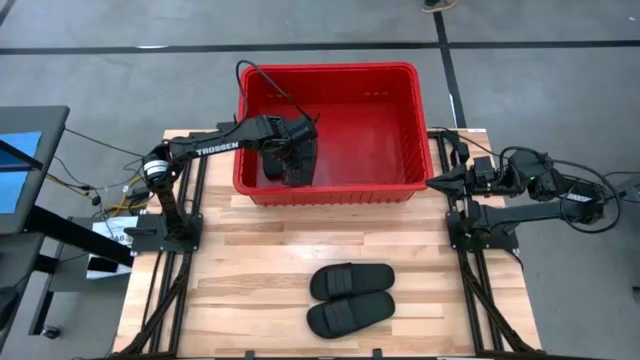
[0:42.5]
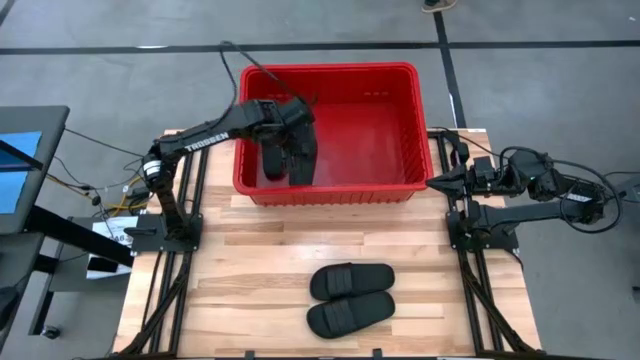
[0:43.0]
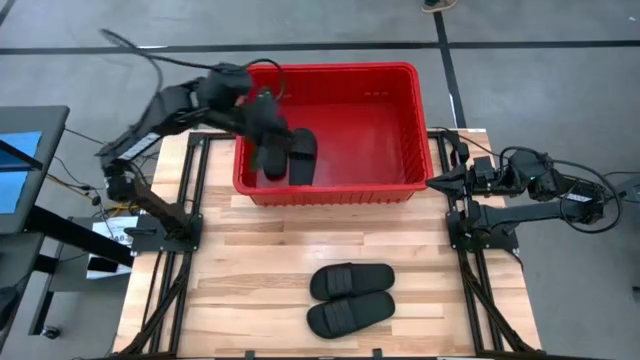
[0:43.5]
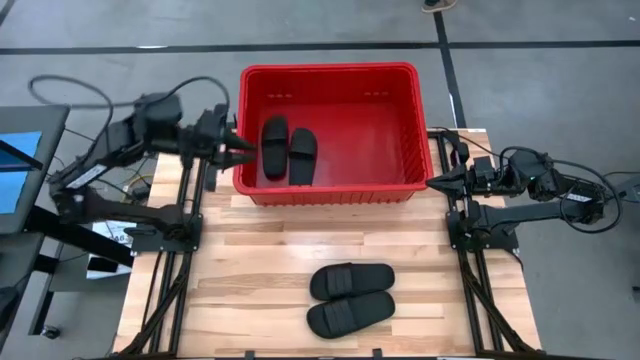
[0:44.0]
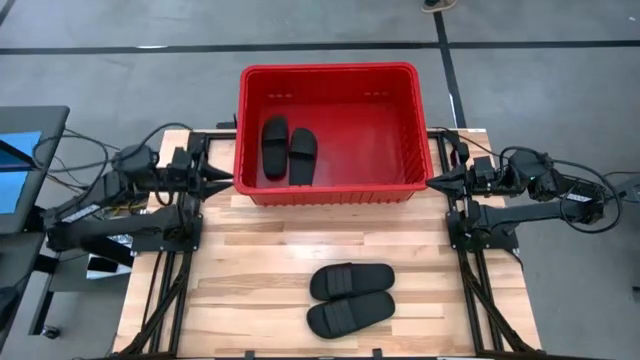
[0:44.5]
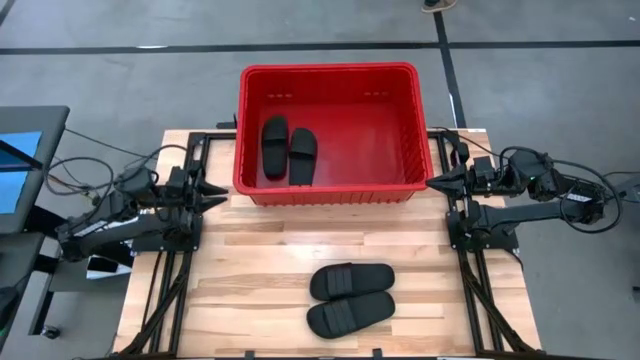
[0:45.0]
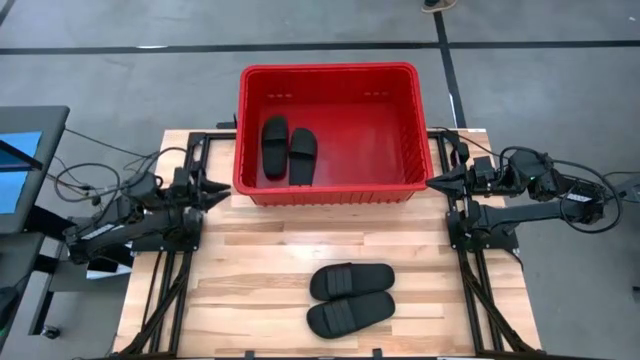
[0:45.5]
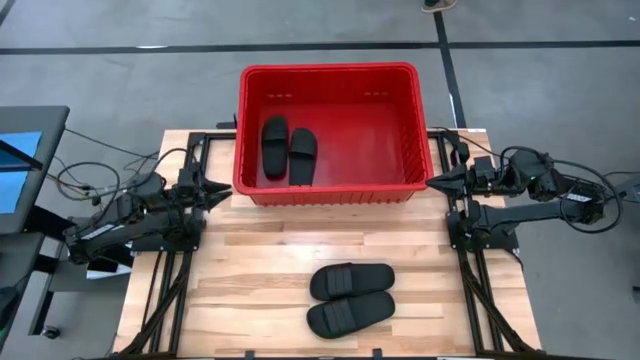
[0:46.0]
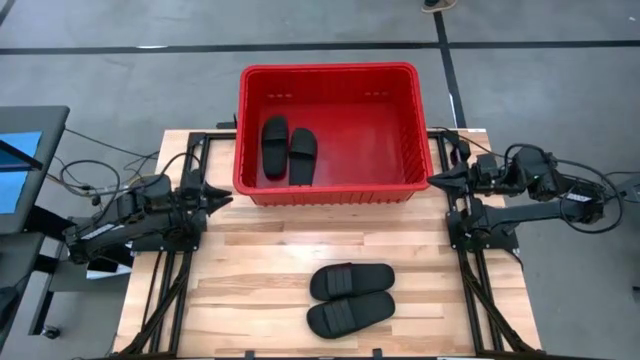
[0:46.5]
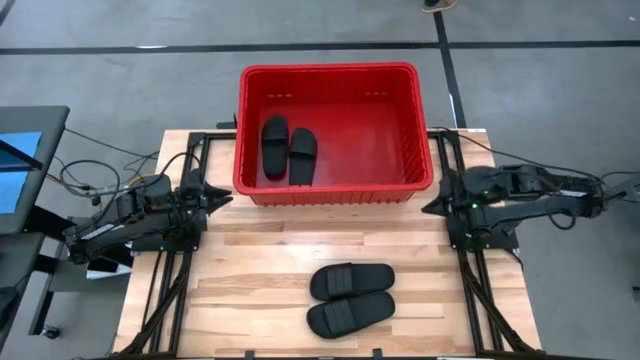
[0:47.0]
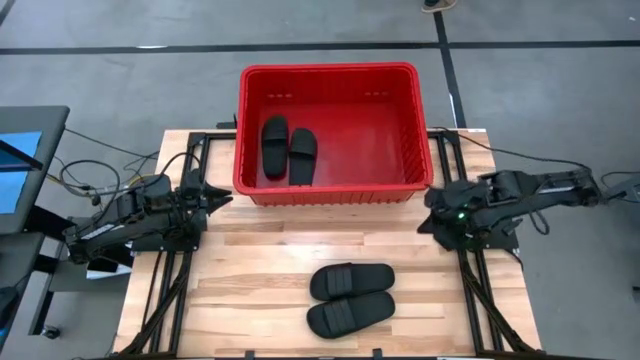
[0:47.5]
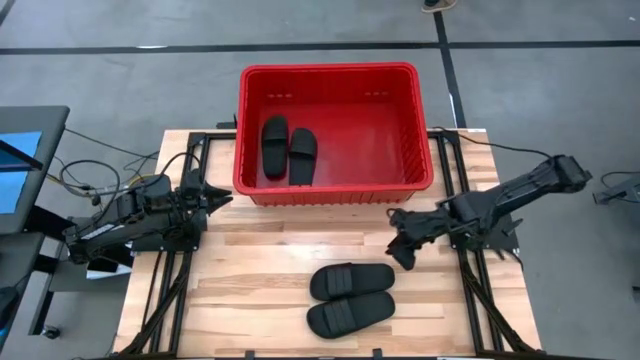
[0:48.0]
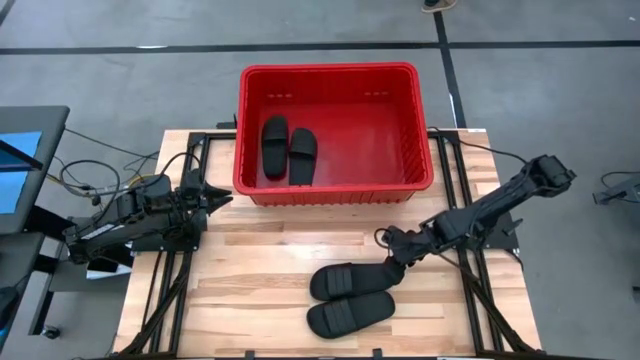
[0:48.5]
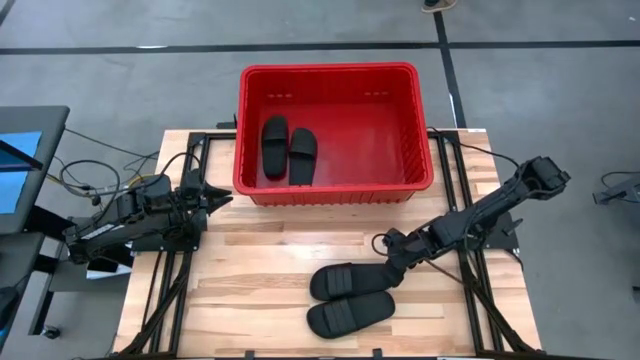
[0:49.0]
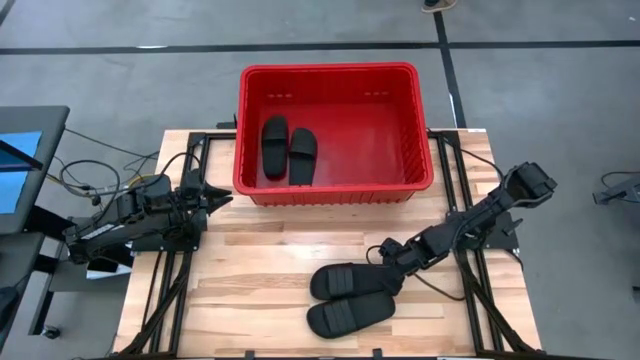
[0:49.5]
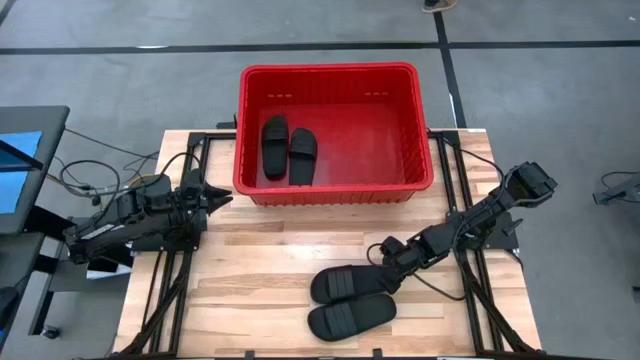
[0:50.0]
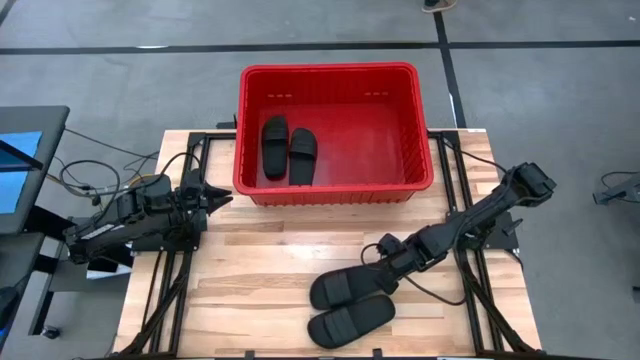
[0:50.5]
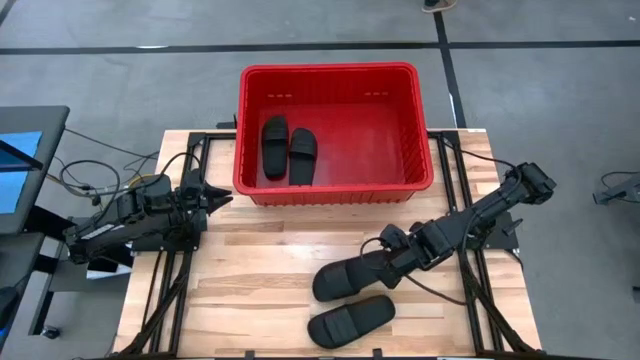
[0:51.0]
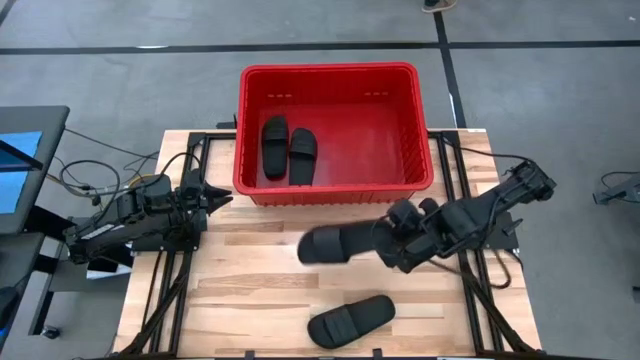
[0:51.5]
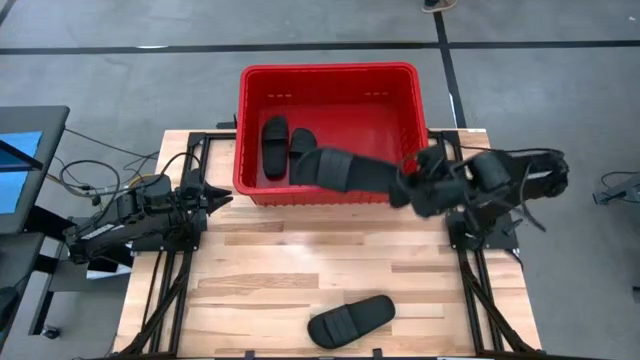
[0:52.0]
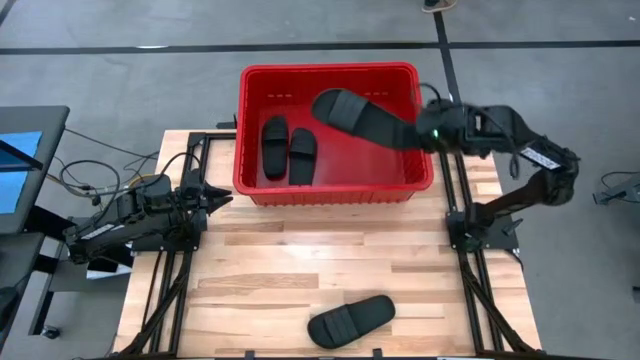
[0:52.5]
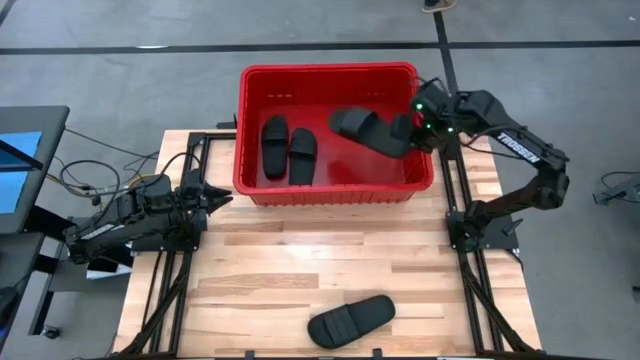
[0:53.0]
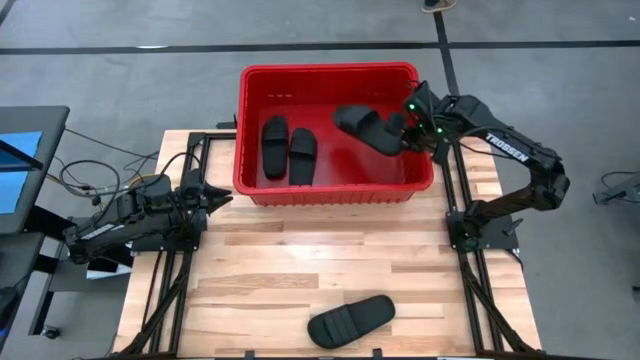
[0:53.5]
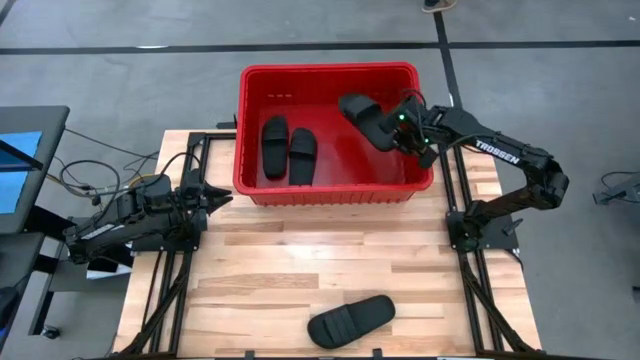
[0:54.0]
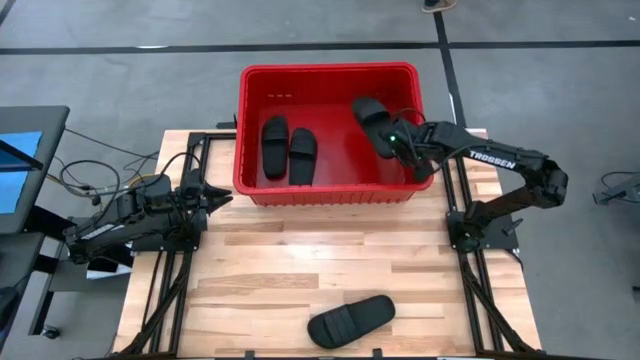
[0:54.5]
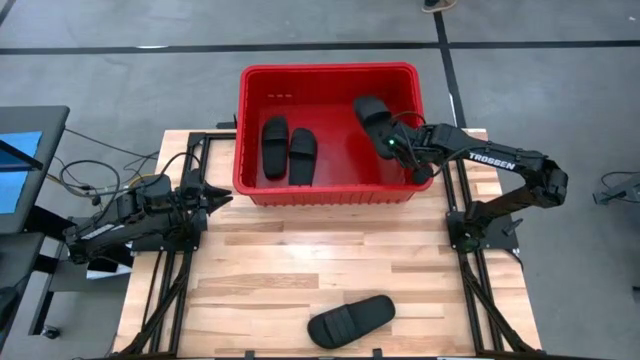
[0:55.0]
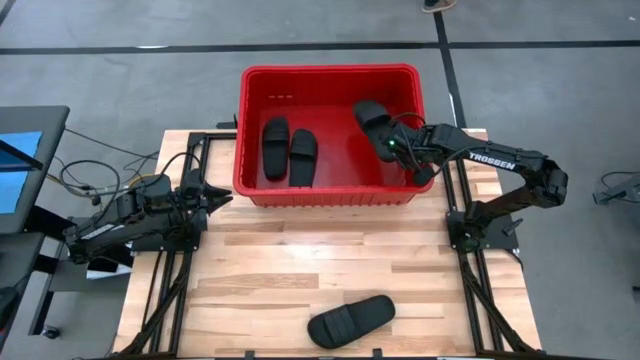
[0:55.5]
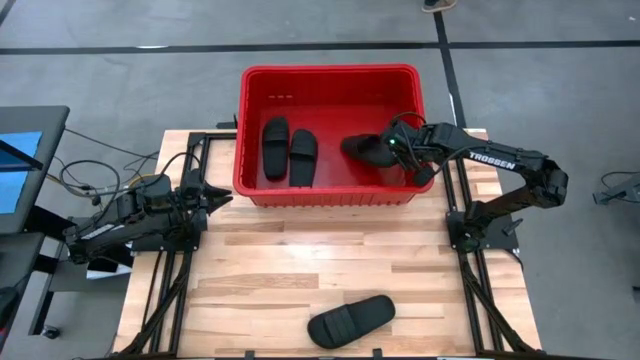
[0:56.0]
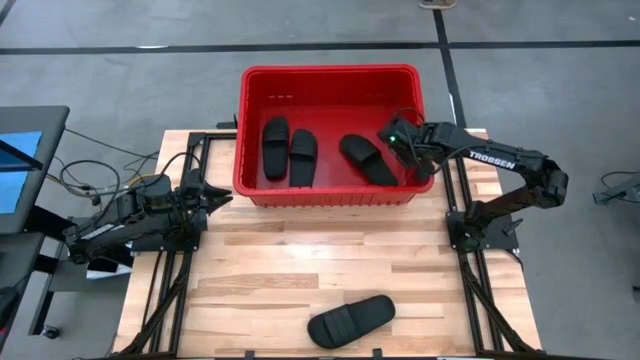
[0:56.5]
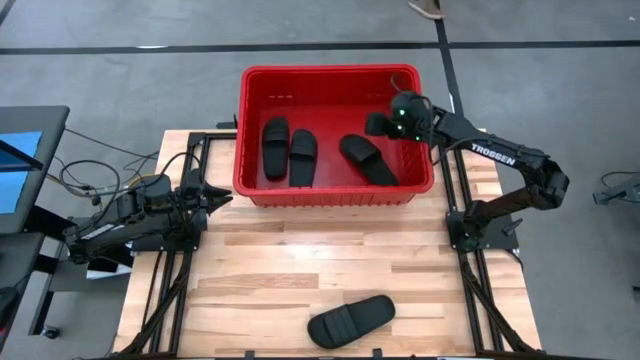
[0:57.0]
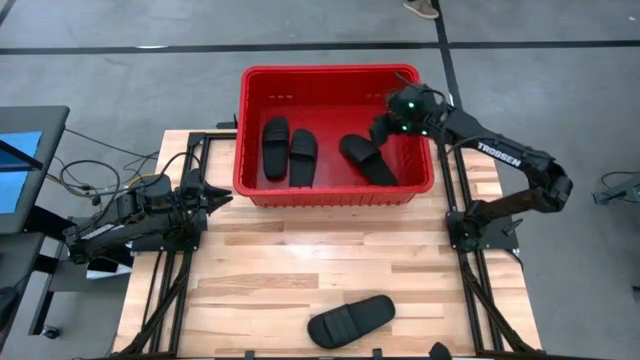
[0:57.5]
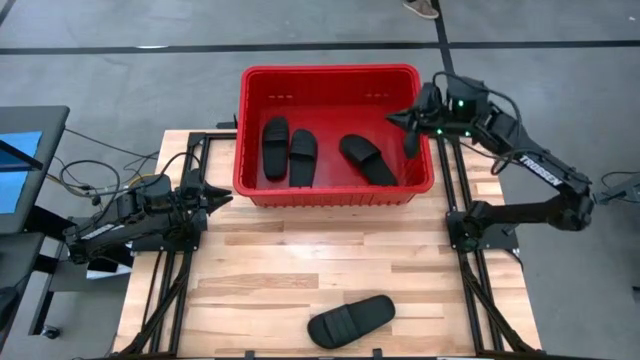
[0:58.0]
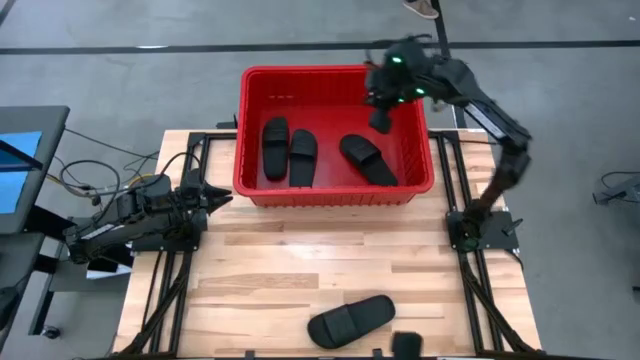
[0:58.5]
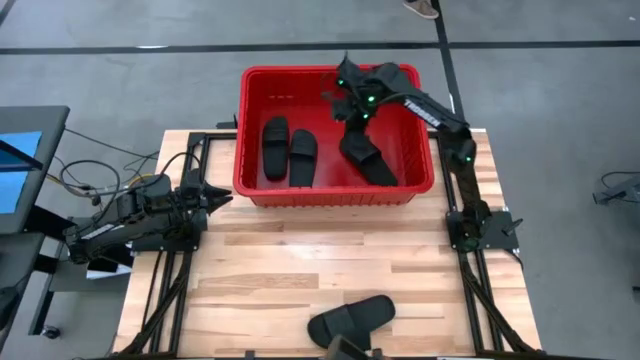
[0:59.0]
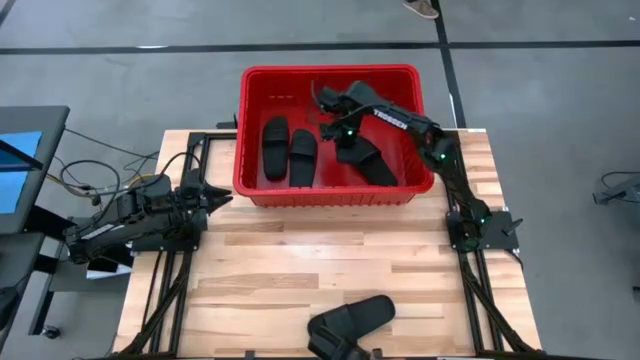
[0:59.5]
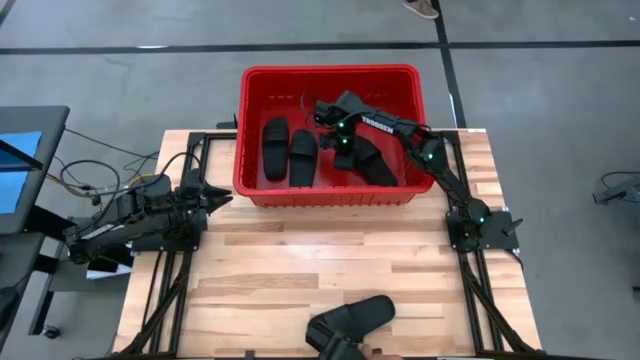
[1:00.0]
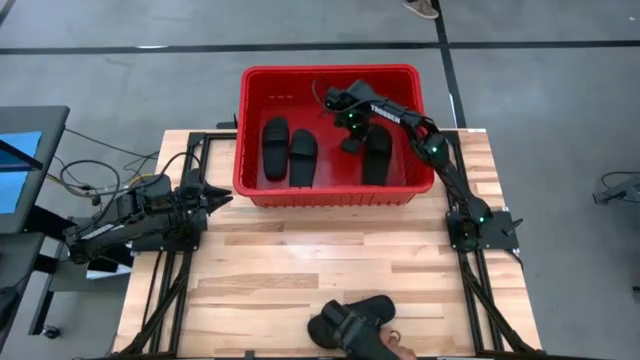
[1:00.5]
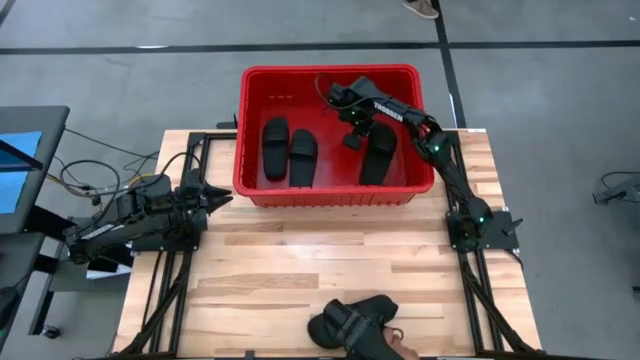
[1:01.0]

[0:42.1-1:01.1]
Task: Pick and place slides into bin
Put the top black slipper into the red bin

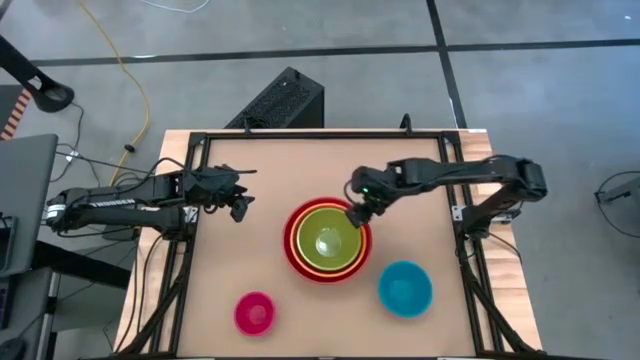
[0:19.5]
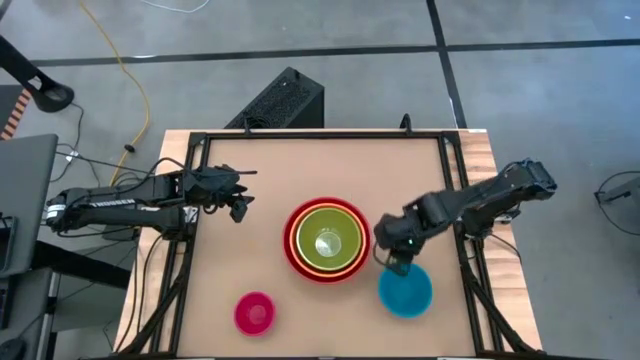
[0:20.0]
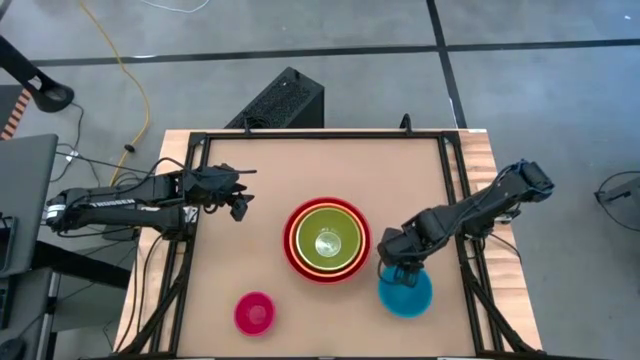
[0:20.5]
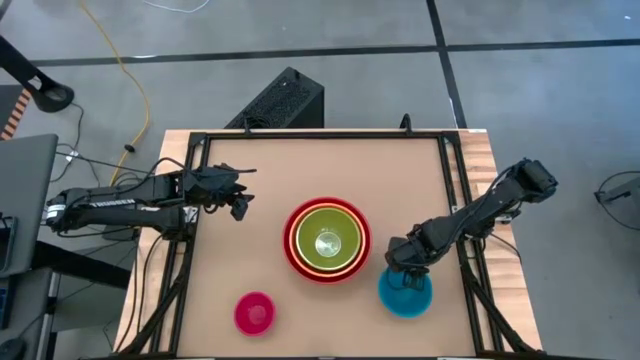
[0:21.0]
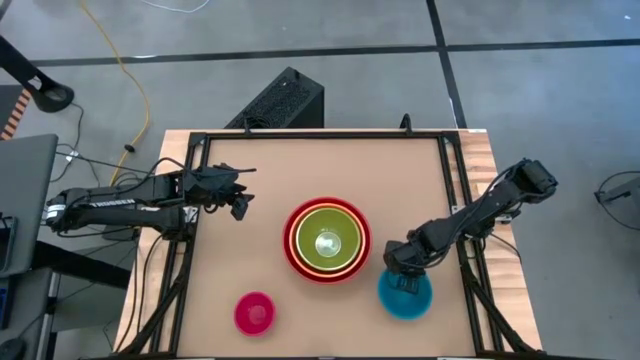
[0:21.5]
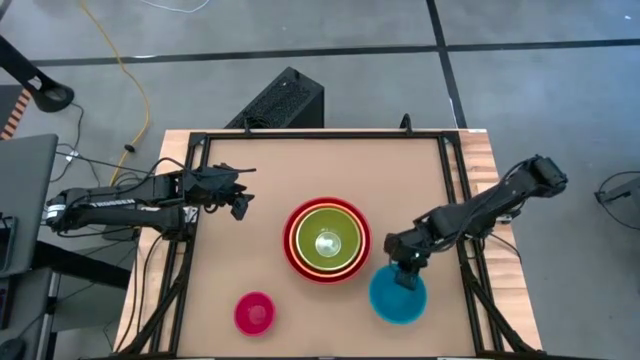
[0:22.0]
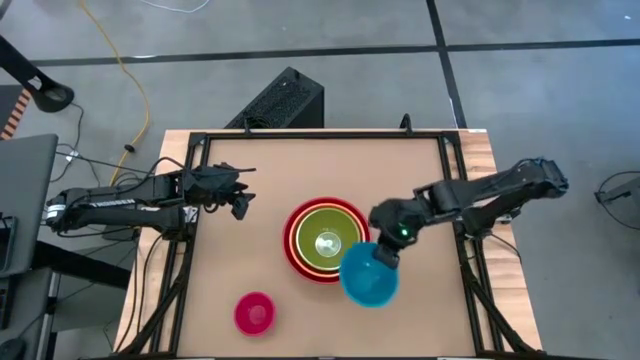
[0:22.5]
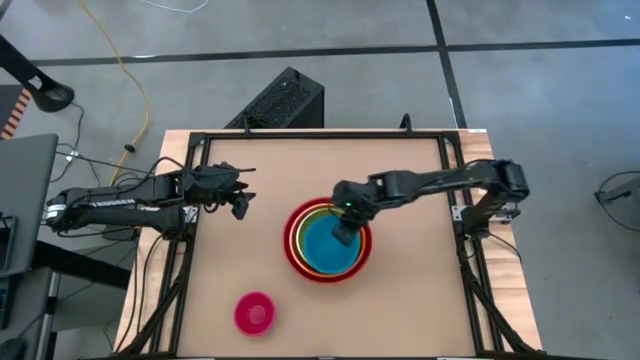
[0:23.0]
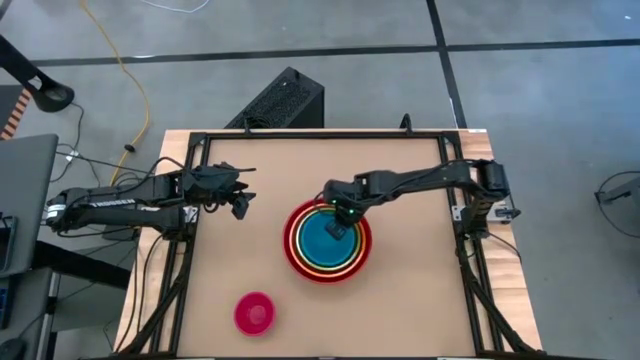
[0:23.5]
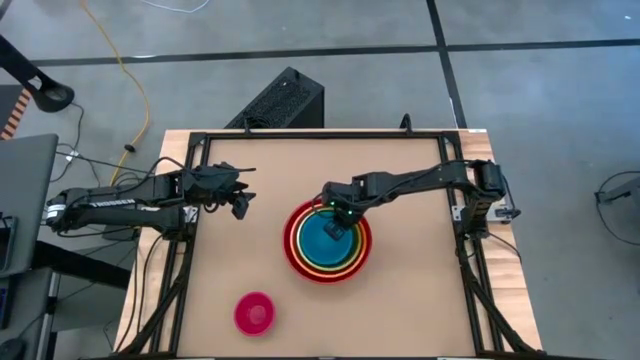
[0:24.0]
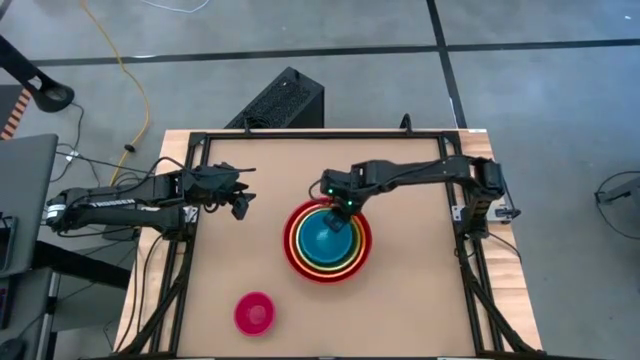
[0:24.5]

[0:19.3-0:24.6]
Task: Nest bowls inside each other by size order
Stack the blue bowl on top of the green bowl
